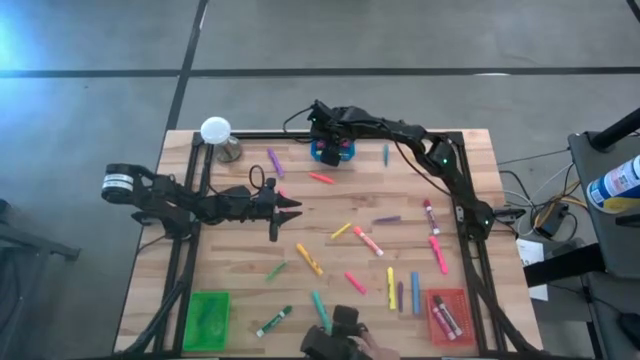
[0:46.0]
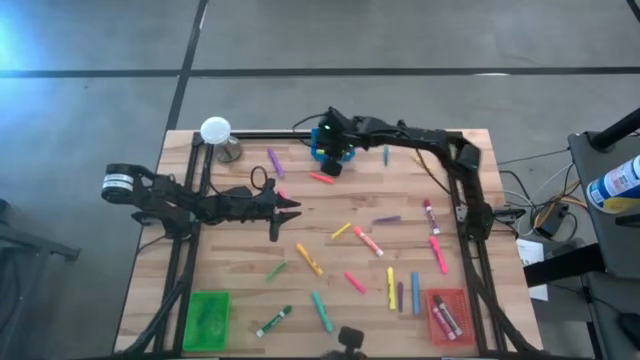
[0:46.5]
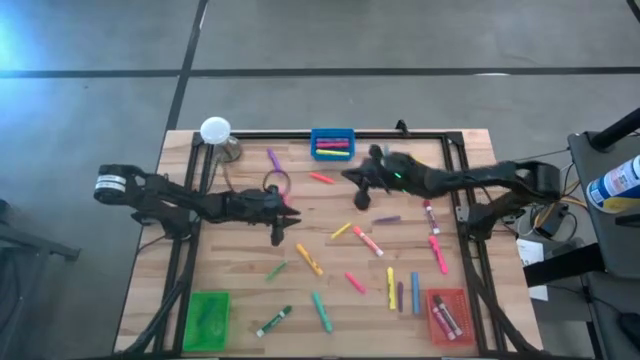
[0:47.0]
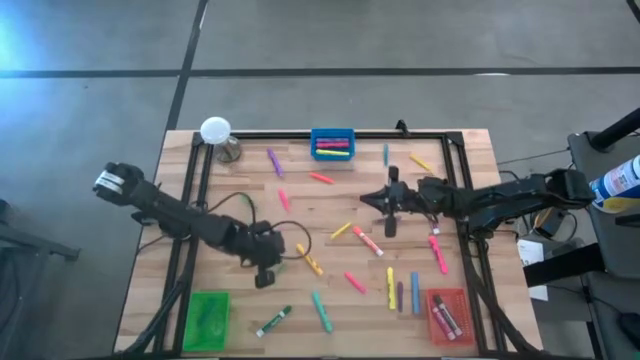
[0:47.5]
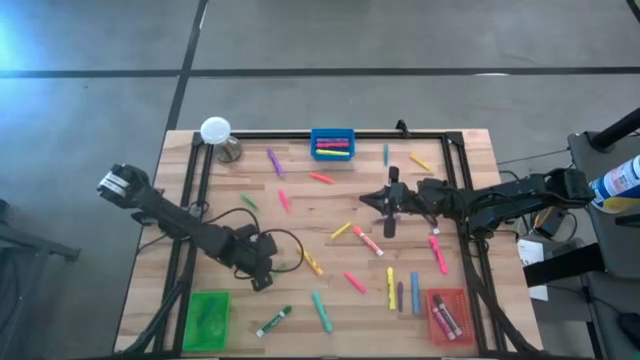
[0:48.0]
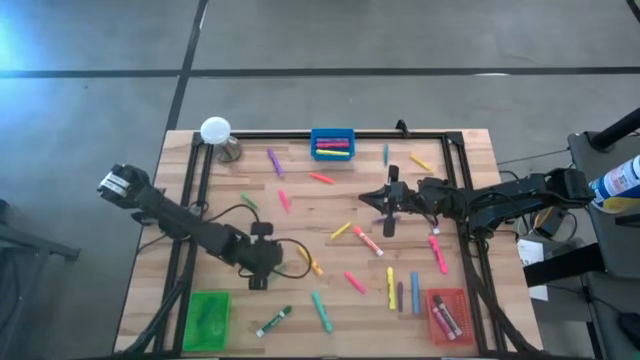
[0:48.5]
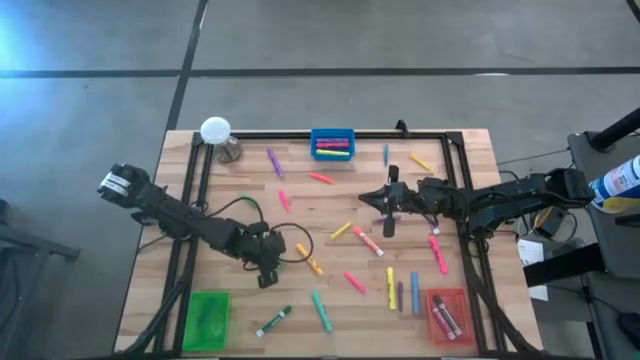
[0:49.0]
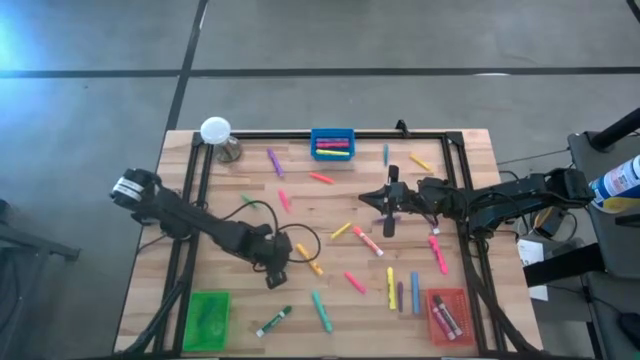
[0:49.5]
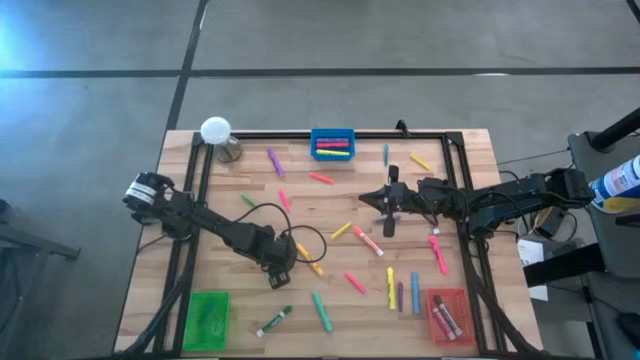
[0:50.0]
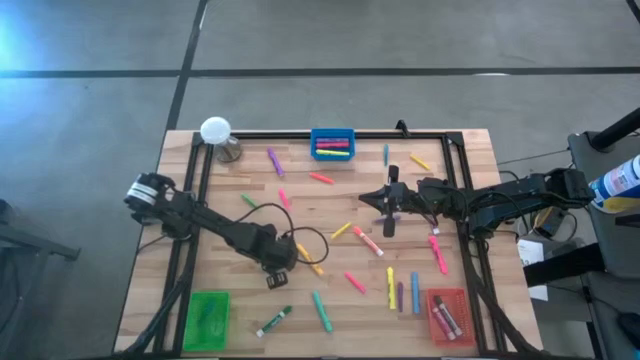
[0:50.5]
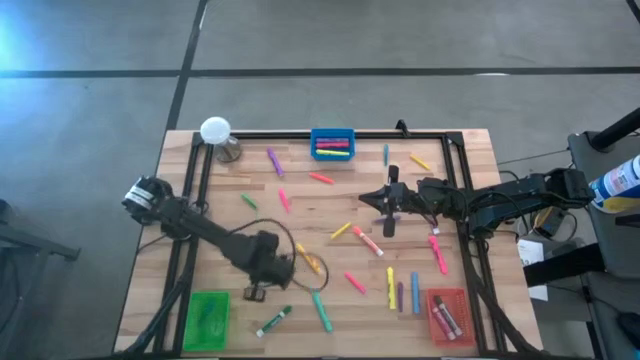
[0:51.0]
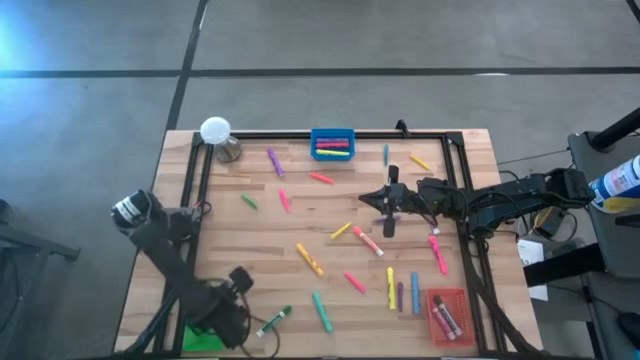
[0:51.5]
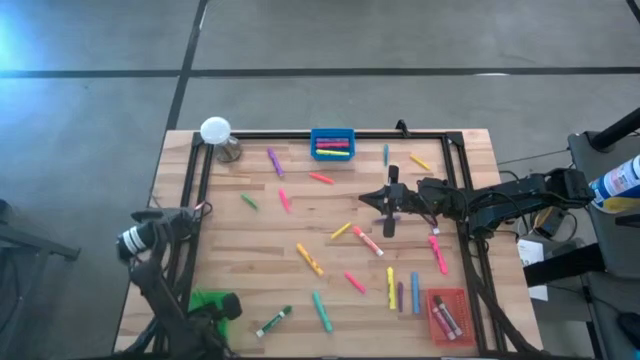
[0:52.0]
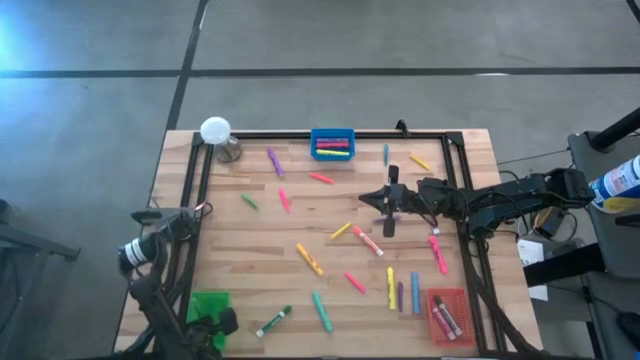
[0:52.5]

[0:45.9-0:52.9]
Task: Pick & Place Markers
Put the bottom green pen into the green bin

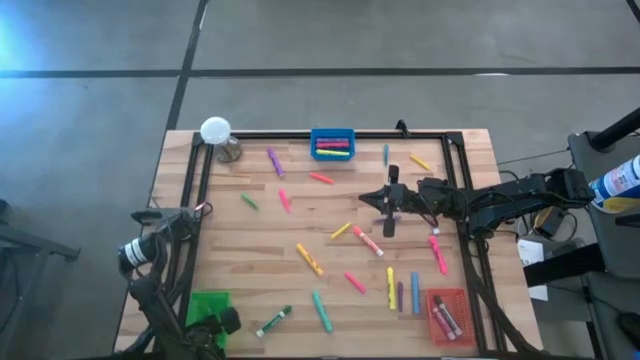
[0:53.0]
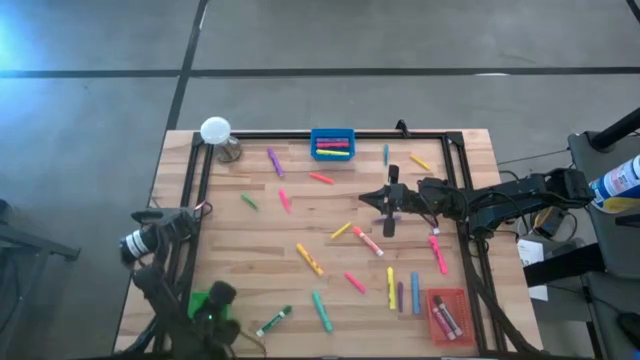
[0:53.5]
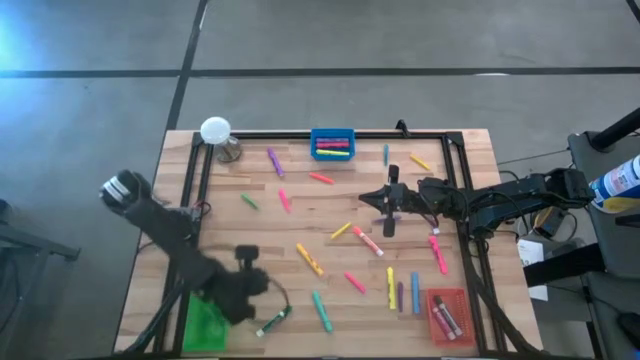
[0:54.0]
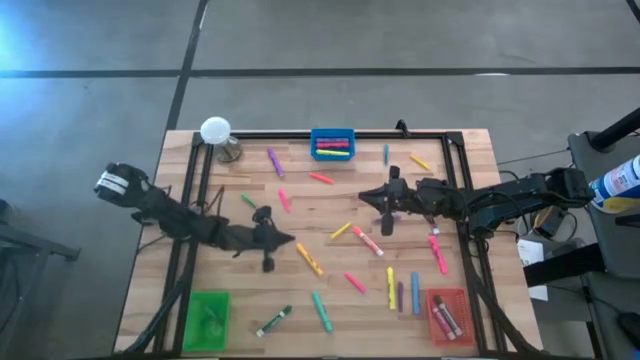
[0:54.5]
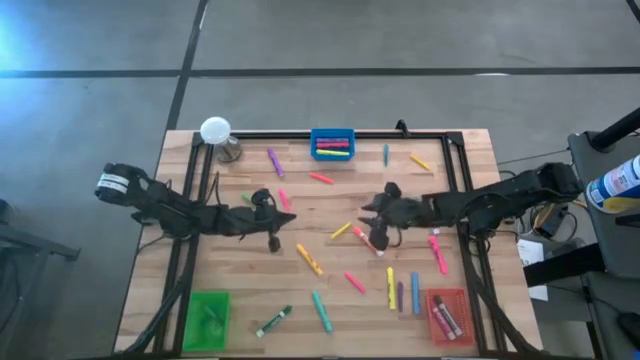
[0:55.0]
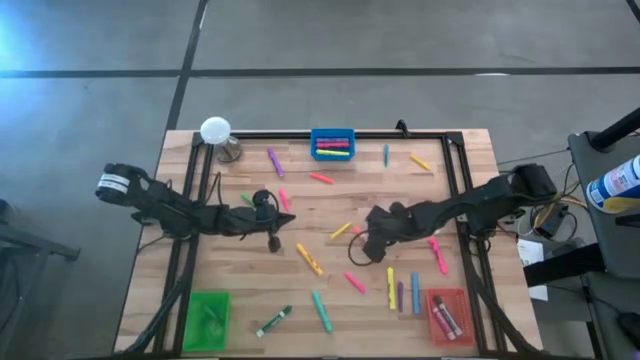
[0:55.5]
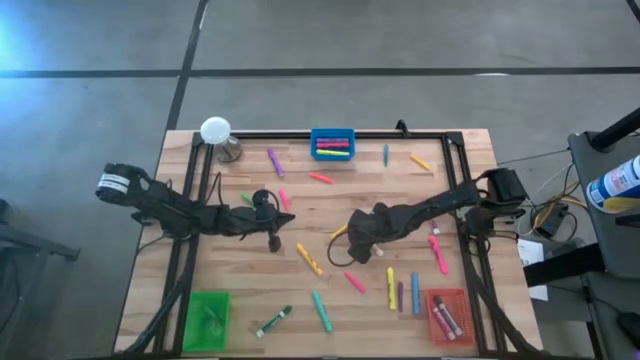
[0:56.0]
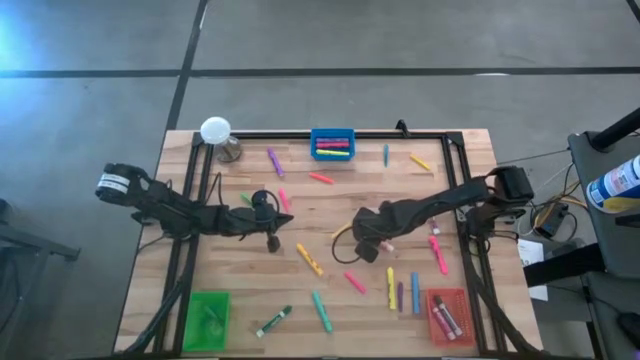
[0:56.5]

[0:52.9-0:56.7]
Put the orange marker into the orange bin

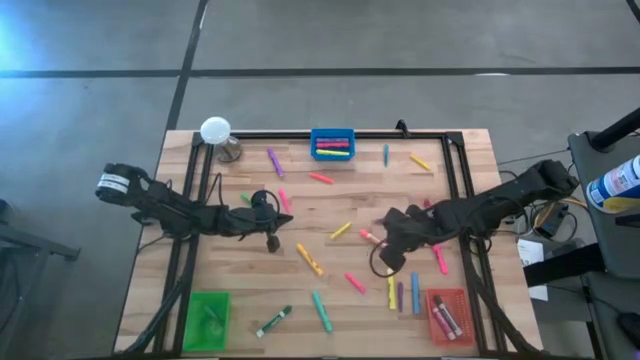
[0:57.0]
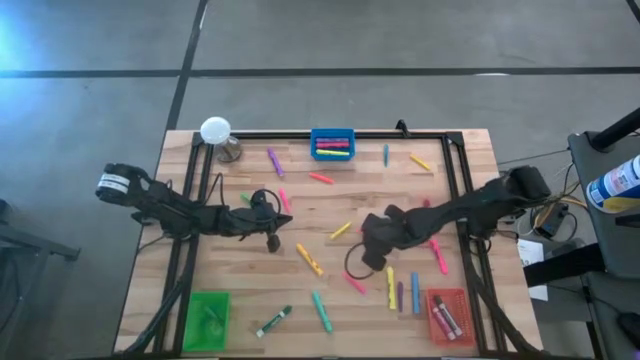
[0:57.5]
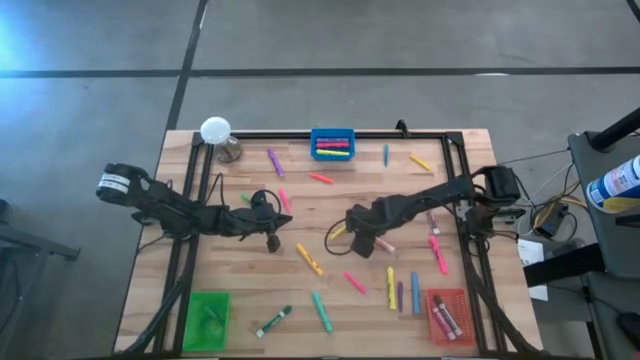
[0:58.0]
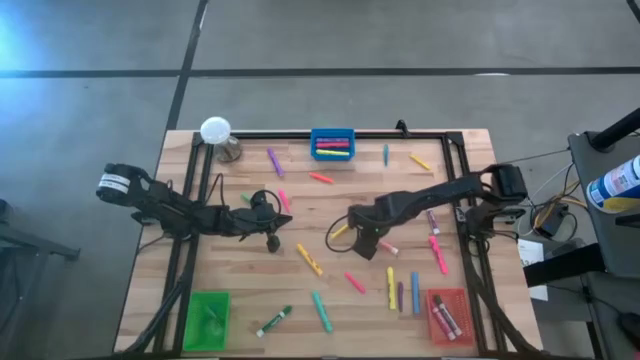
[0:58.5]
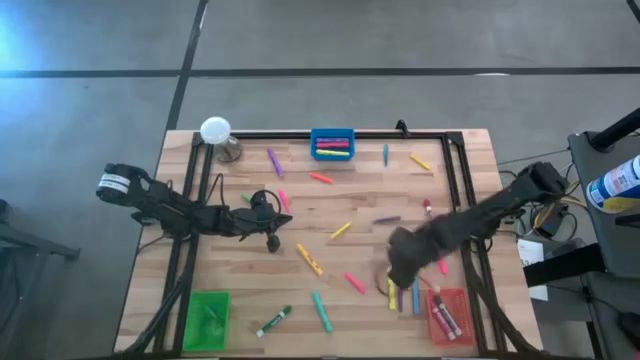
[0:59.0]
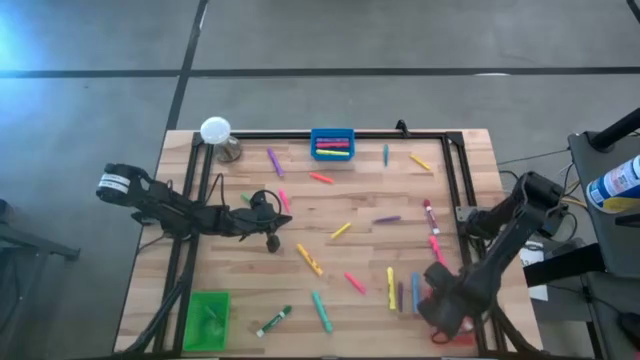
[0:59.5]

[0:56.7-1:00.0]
Put the orange marker into the orange bin

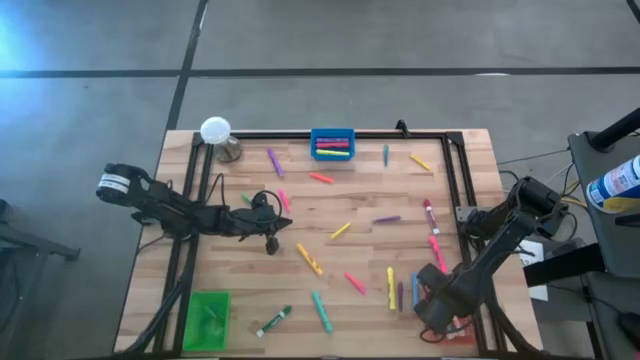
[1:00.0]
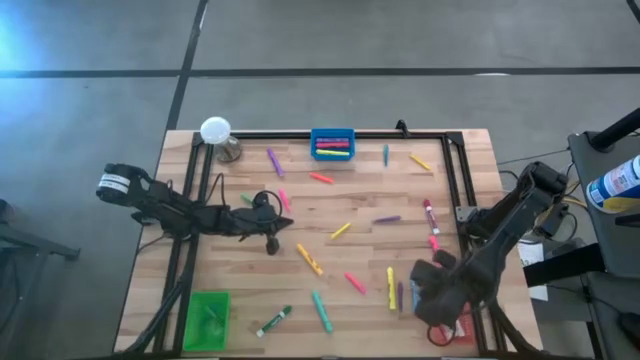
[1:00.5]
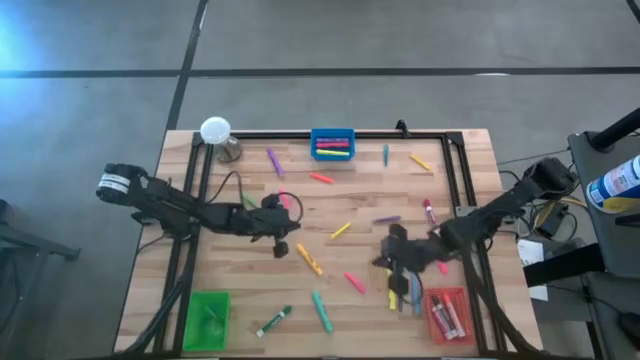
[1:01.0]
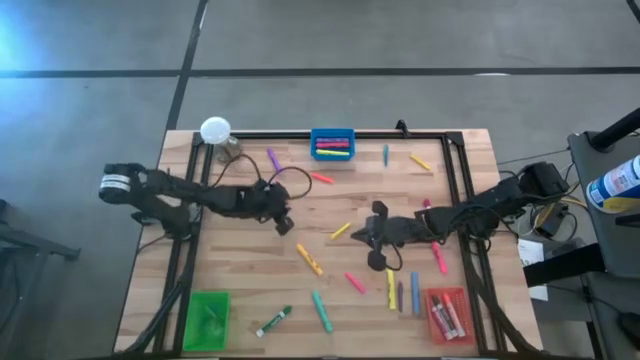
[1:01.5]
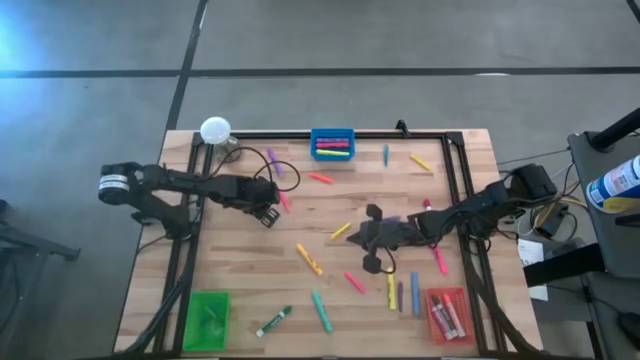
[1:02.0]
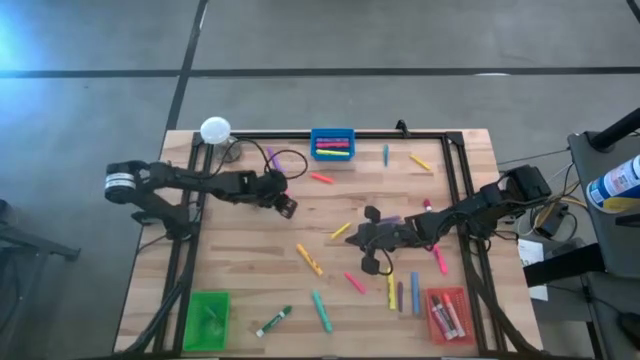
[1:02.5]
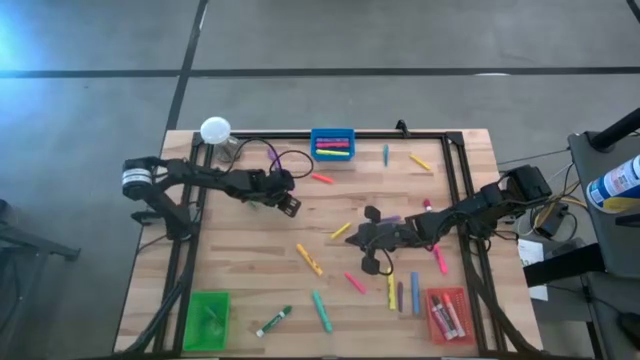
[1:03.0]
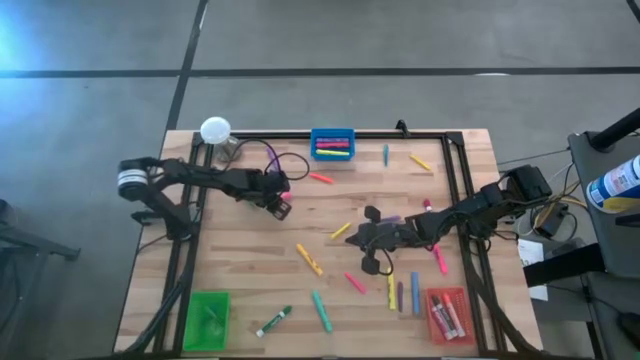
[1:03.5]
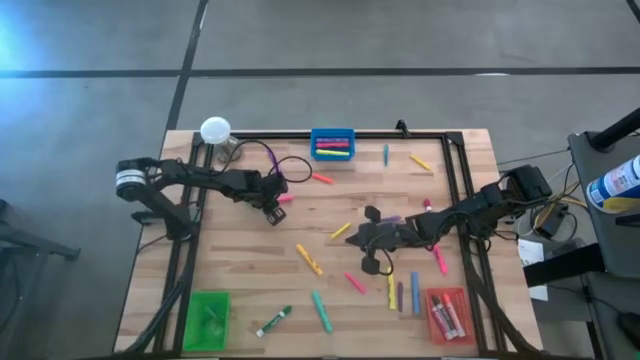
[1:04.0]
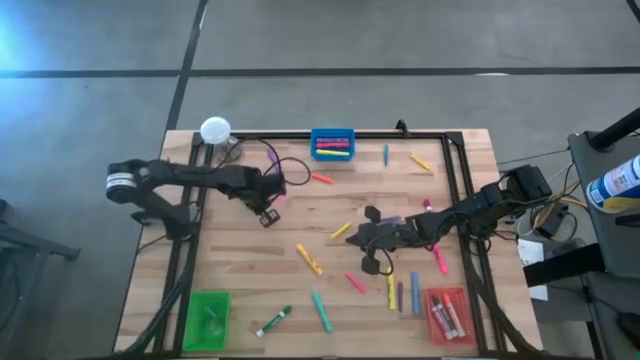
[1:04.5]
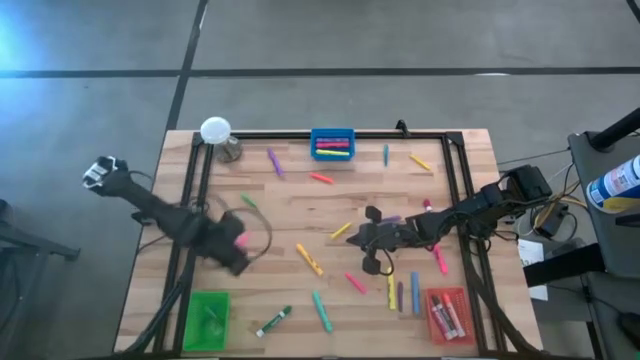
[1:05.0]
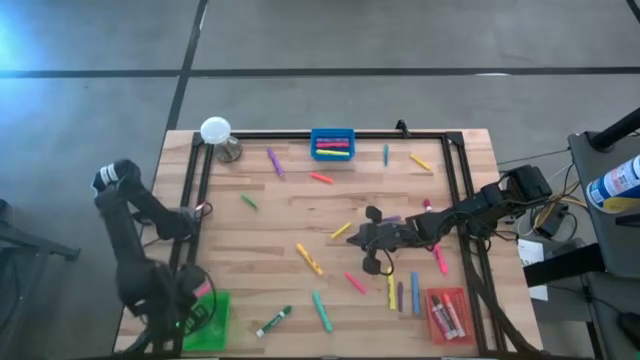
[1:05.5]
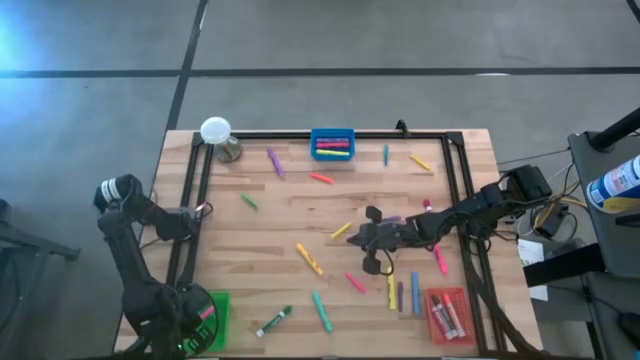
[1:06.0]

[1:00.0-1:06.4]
Put the top pink pen into the green bin

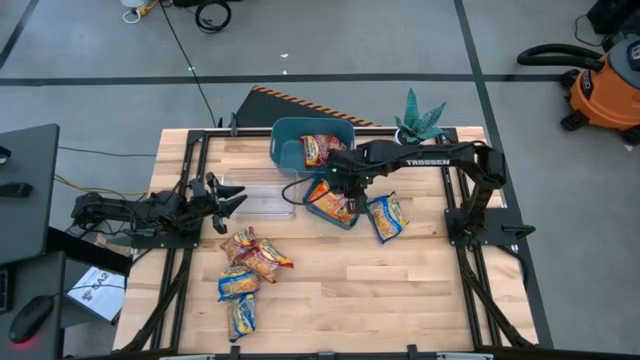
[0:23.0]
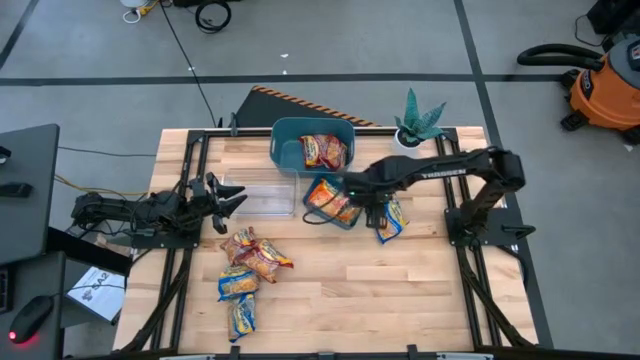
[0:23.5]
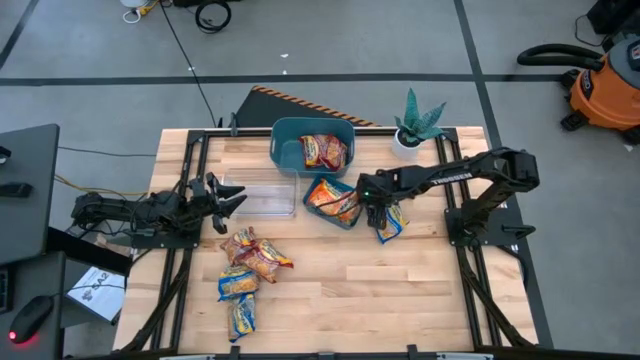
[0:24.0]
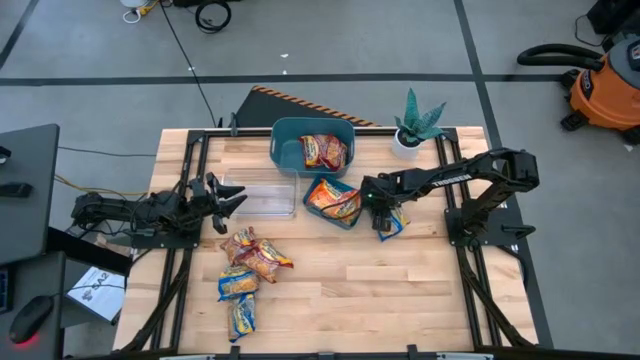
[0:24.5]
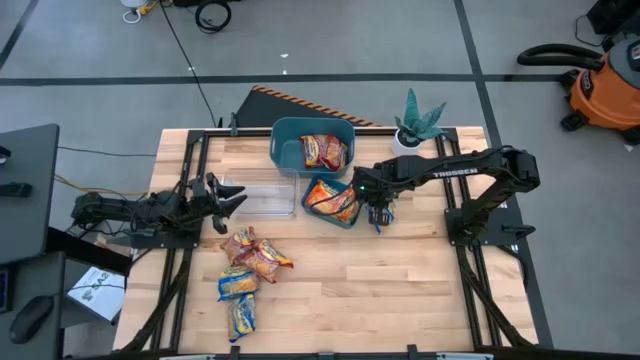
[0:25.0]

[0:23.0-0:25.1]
Task: Sort Maruchan noodles
Put the blue noodle pack into the transparent bin
